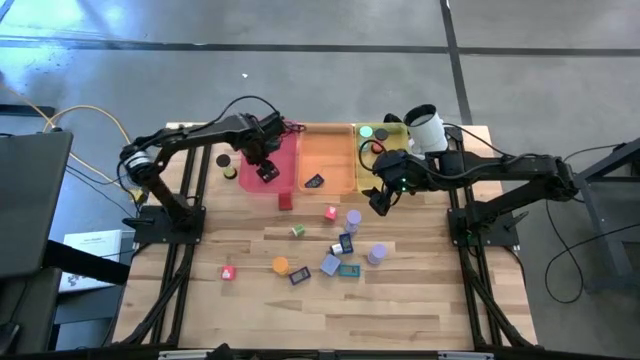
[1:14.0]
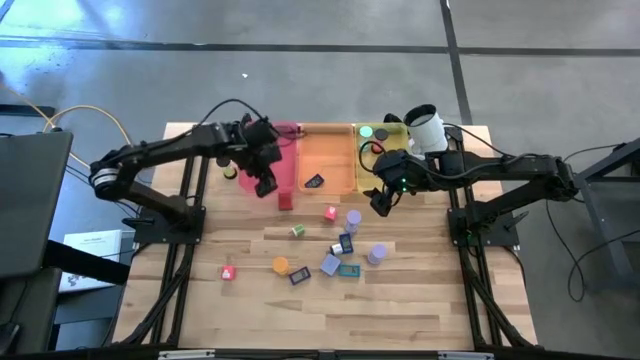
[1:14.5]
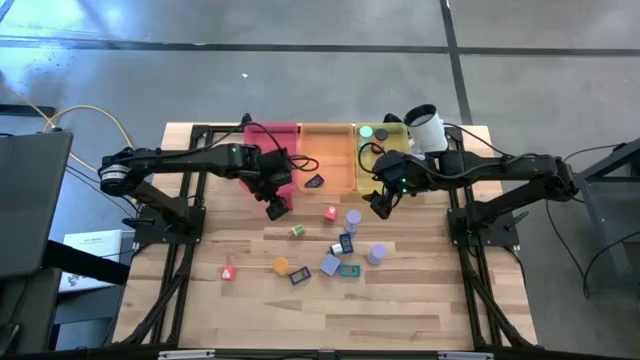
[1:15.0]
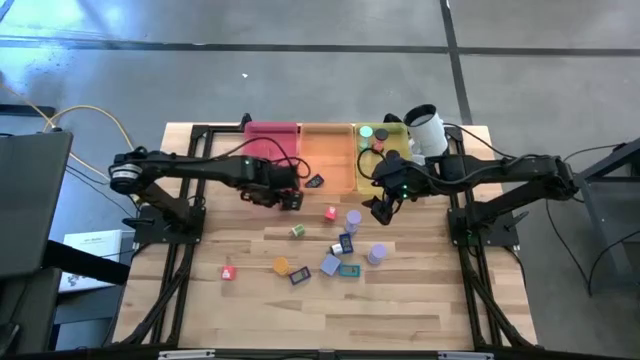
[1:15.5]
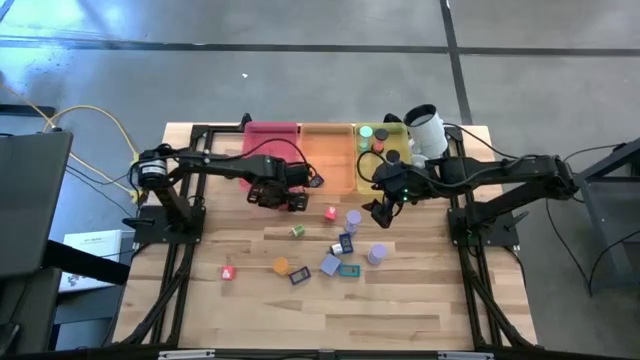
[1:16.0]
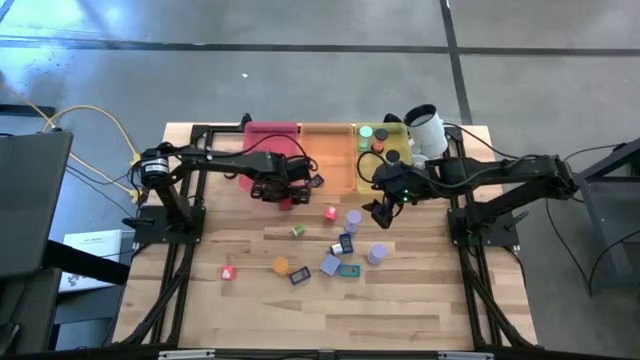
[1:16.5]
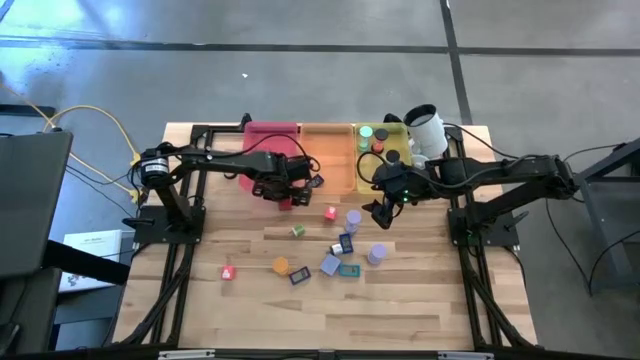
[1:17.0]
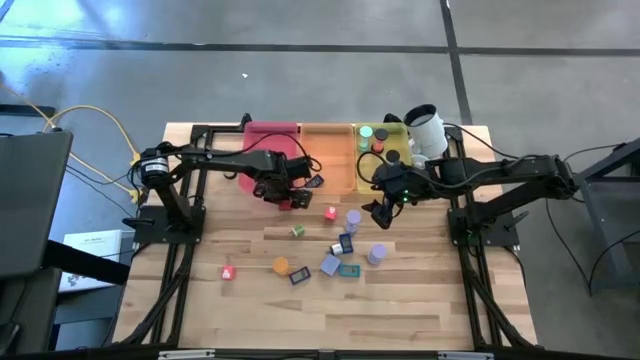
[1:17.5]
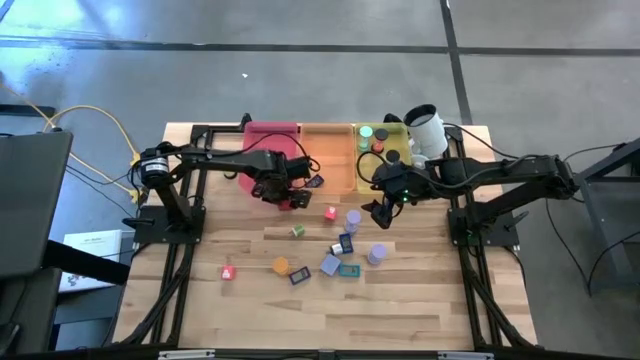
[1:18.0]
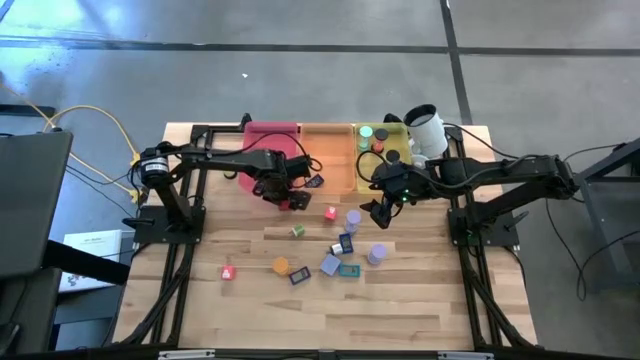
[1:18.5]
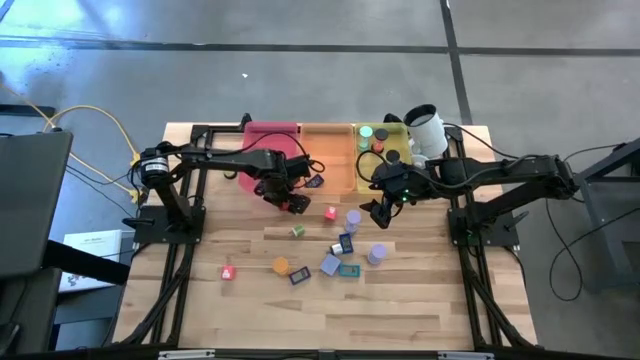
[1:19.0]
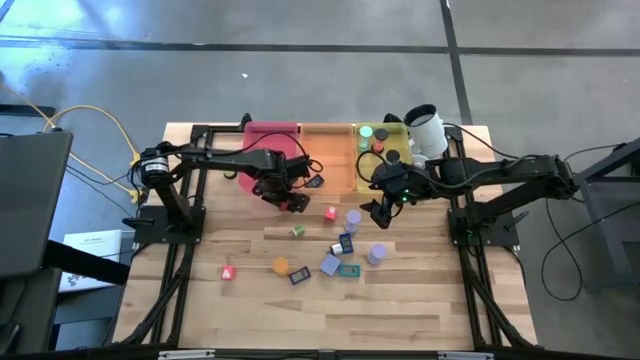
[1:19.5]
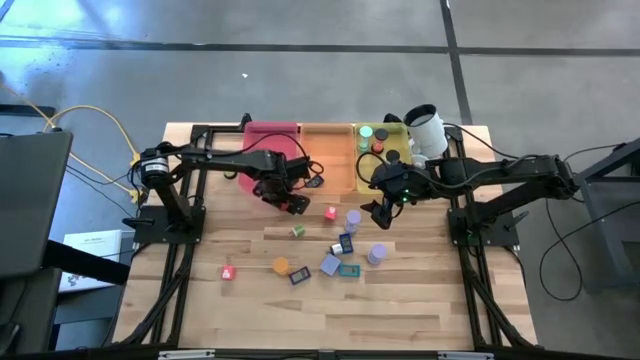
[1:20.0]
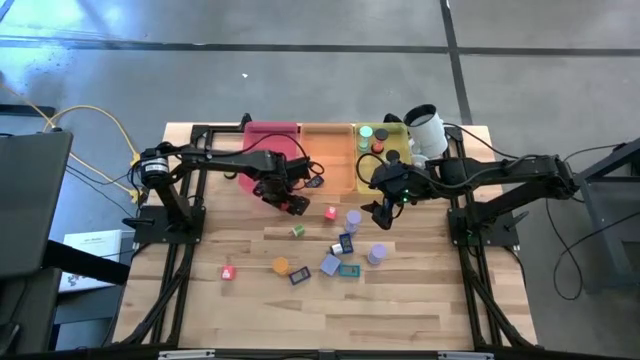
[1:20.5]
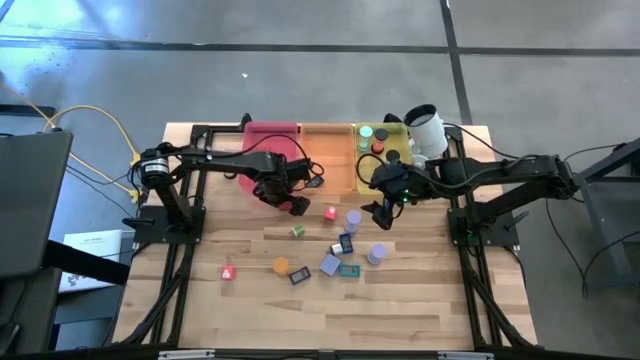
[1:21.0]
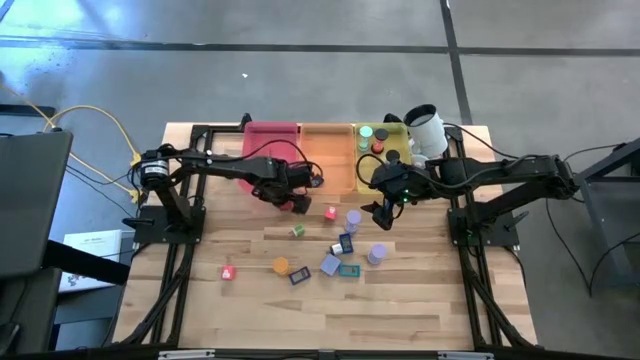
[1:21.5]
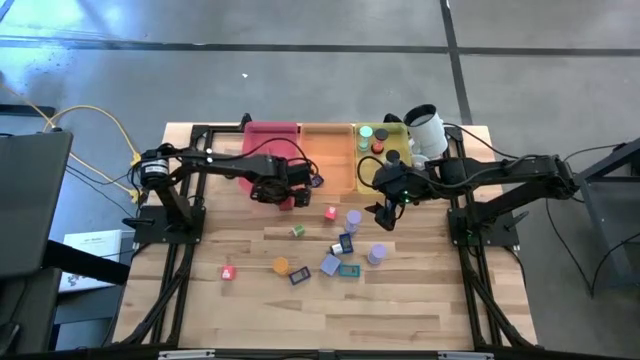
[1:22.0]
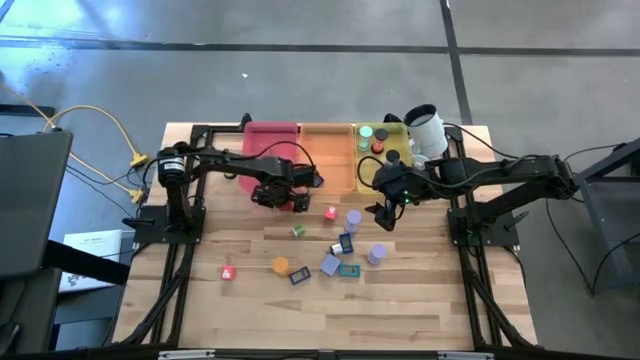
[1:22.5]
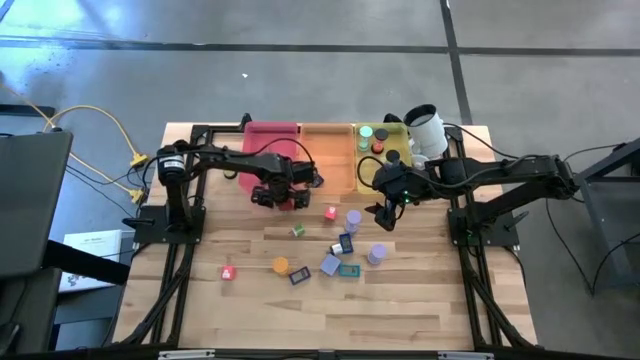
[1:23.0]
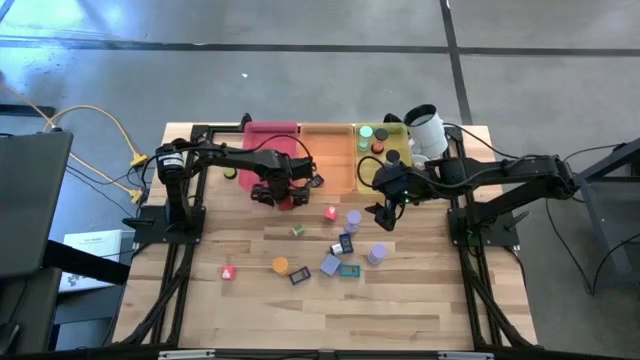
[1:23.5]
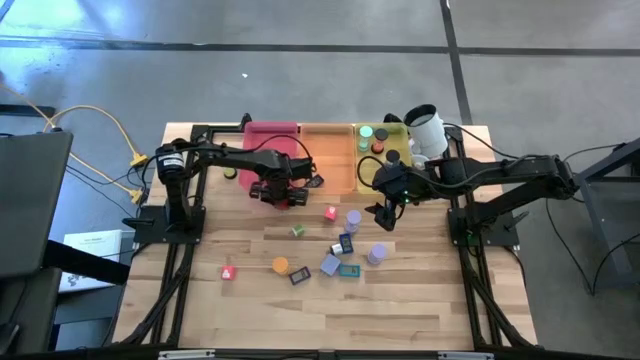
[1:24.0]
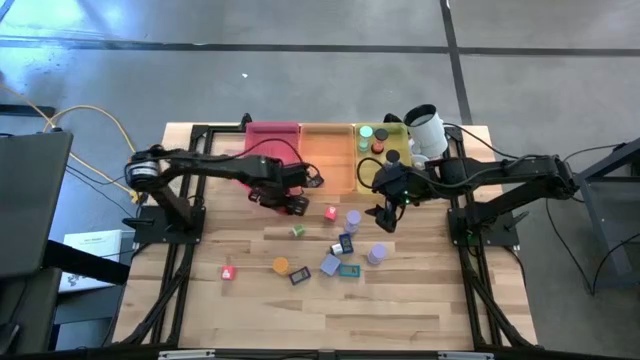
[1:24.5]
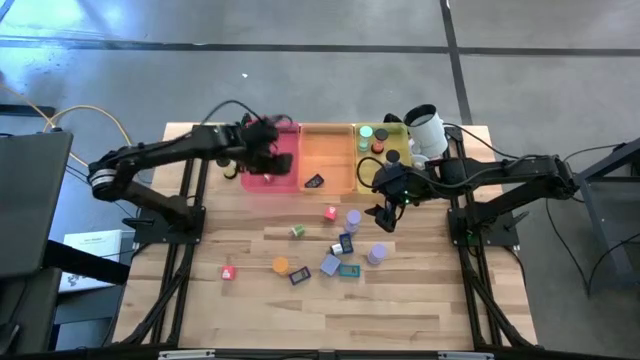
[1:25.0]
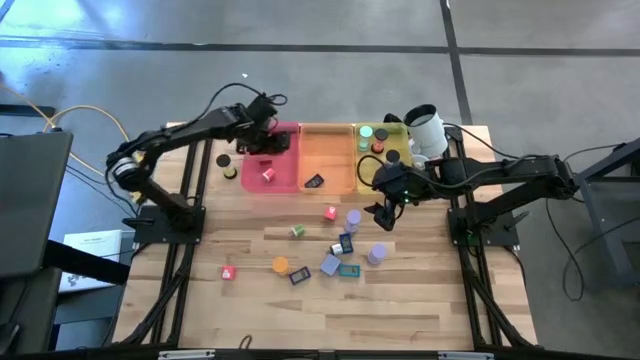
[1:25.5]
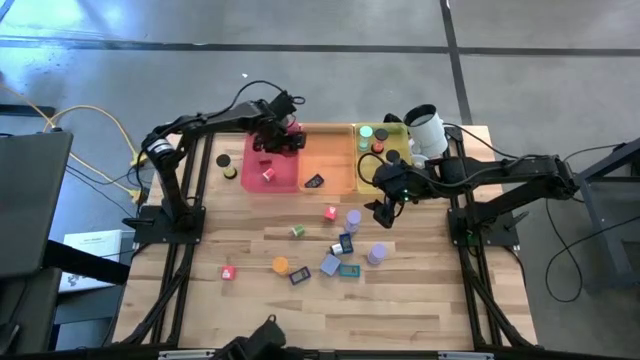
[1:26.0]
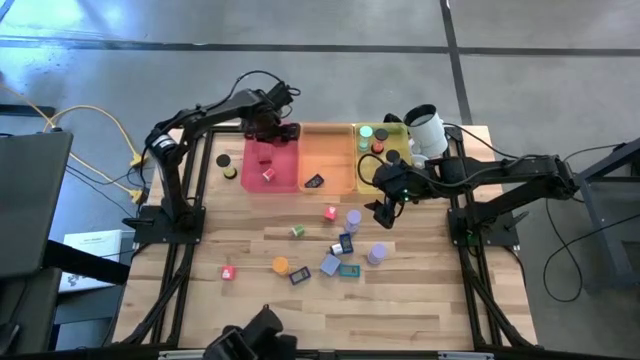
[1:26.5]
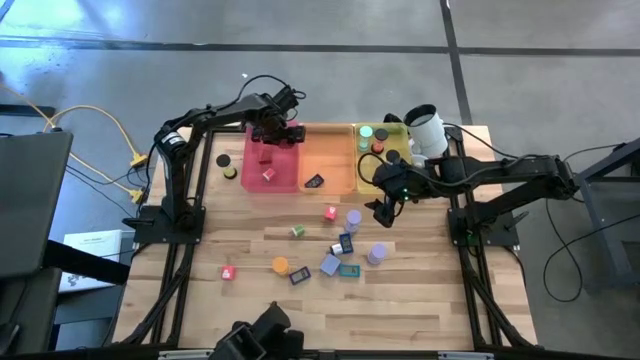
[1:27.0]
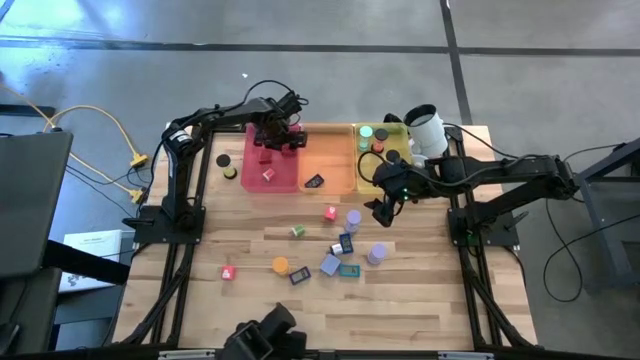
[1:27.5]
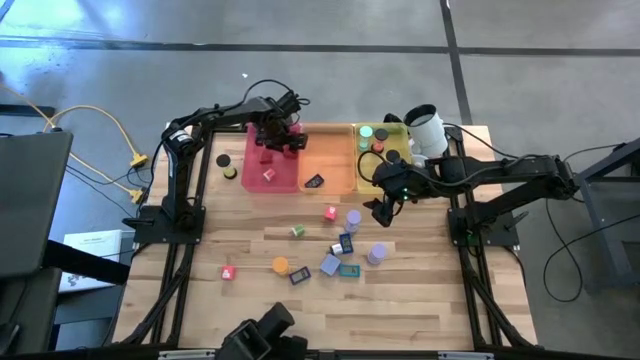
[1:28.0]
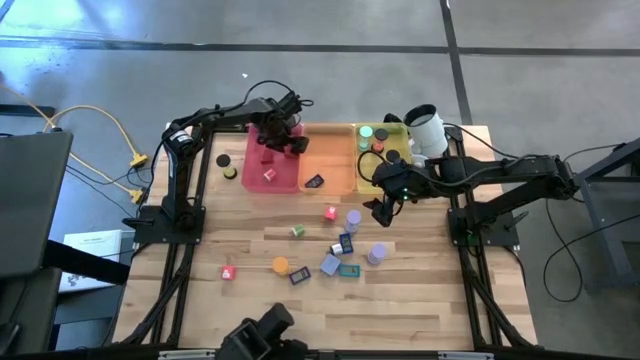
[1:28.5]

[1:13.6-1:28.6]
Task: Pick & Place Office items
Put the red charger adapter into the pink bin

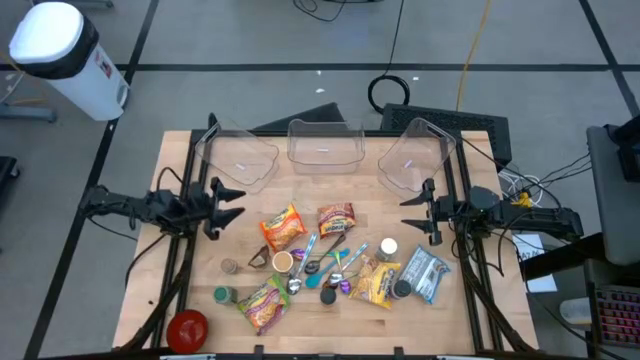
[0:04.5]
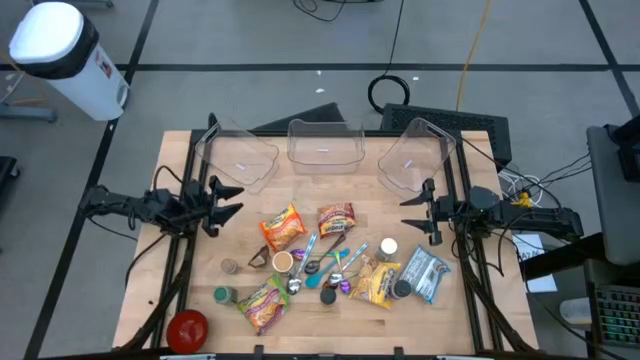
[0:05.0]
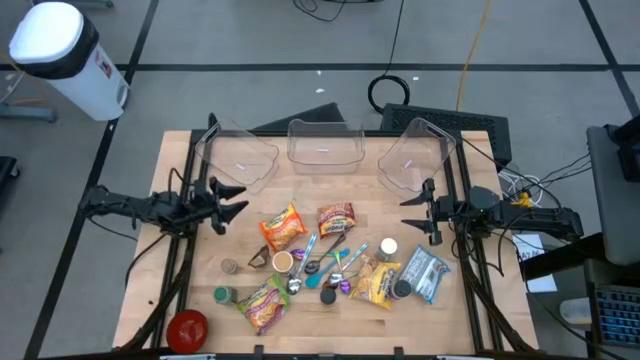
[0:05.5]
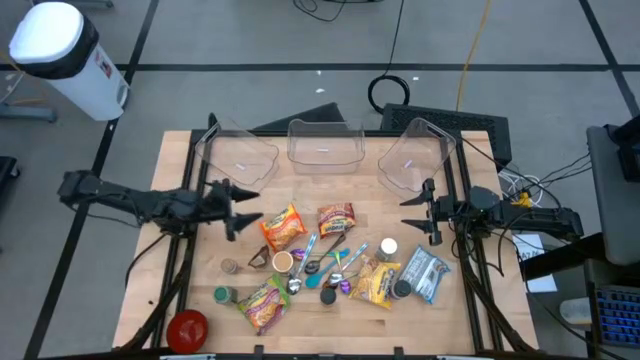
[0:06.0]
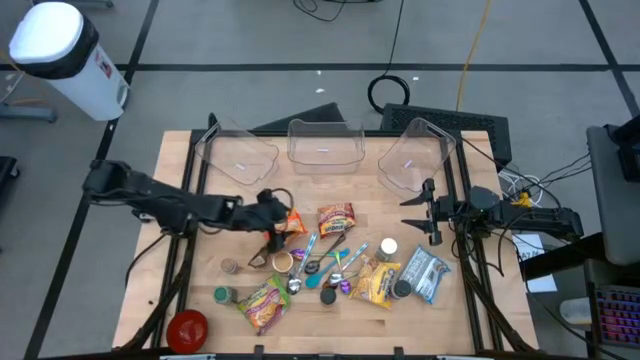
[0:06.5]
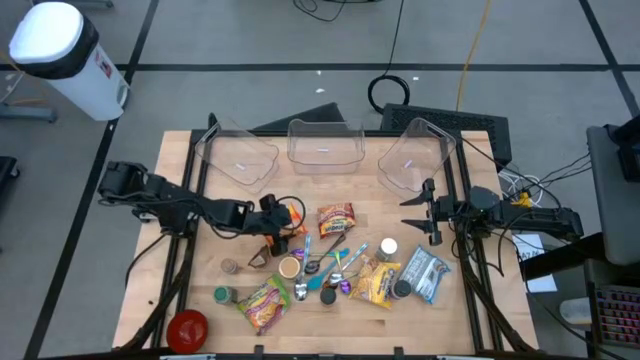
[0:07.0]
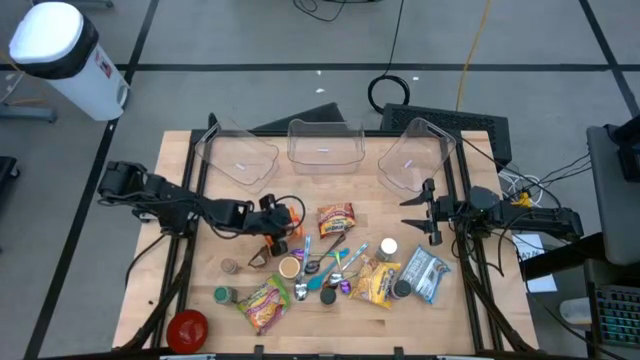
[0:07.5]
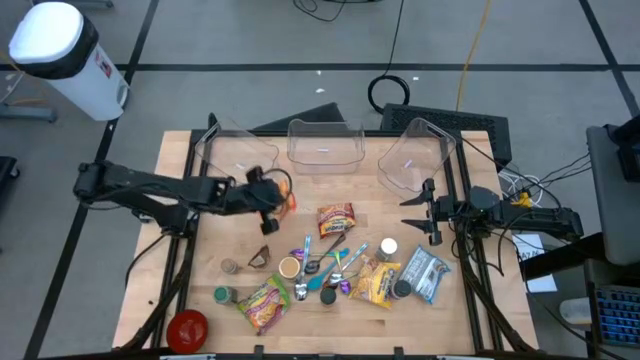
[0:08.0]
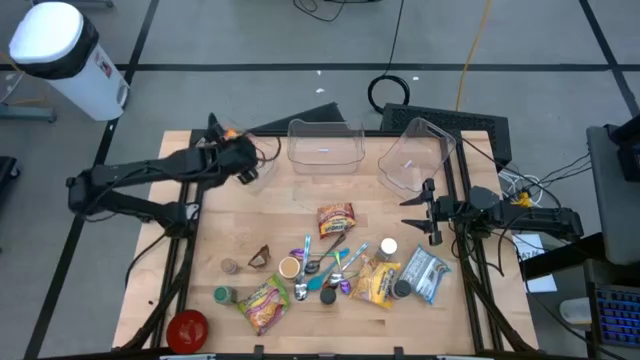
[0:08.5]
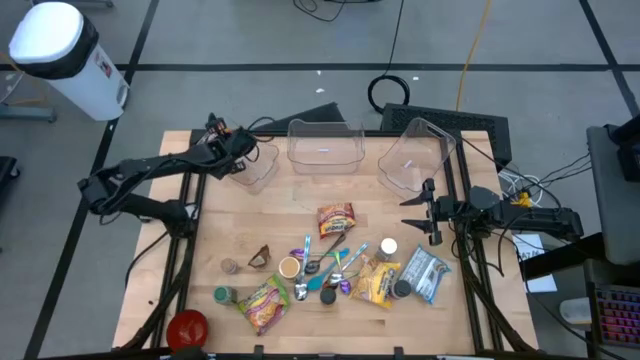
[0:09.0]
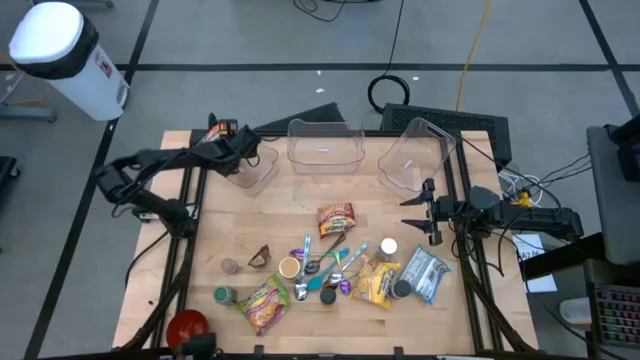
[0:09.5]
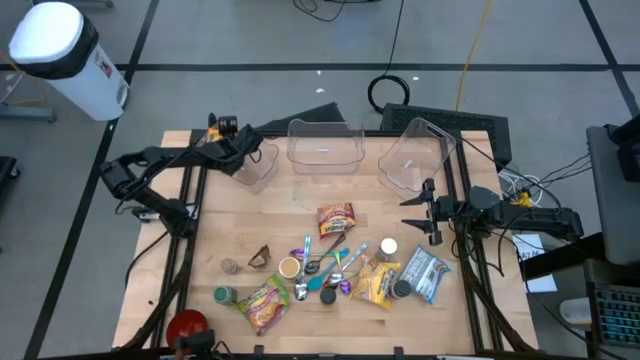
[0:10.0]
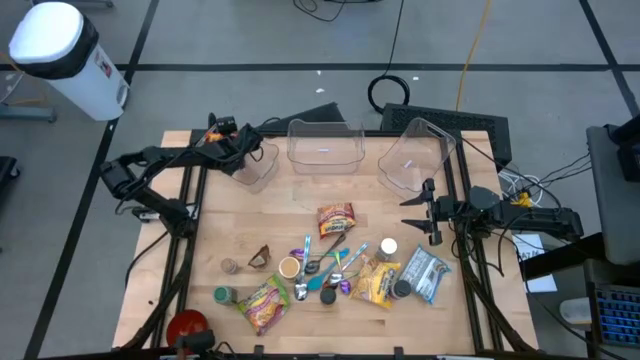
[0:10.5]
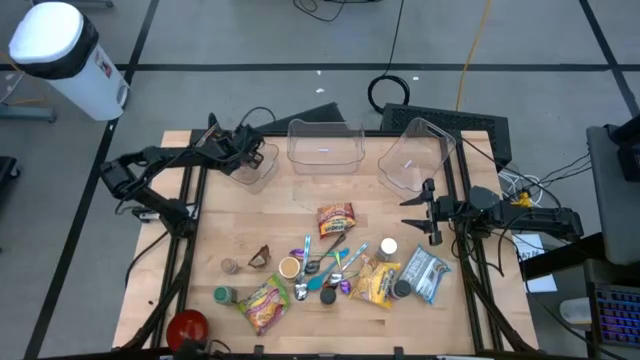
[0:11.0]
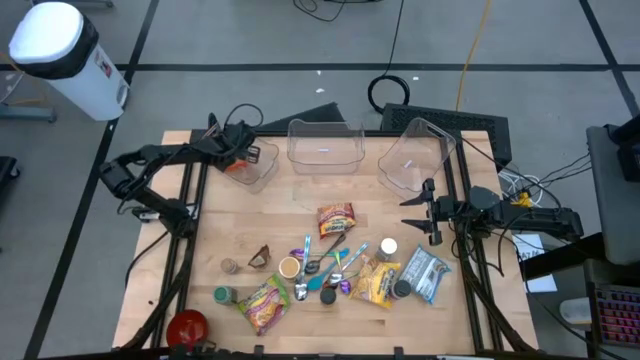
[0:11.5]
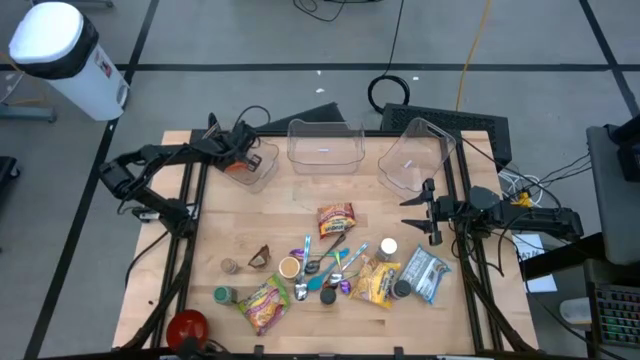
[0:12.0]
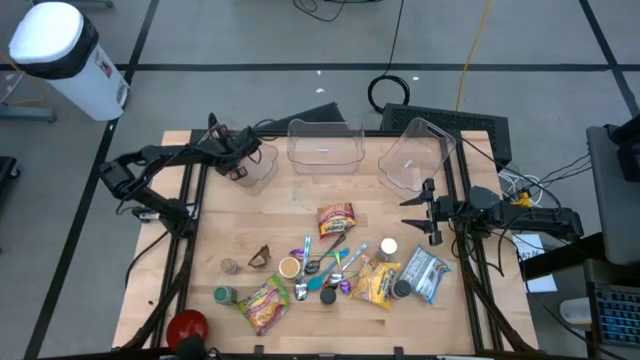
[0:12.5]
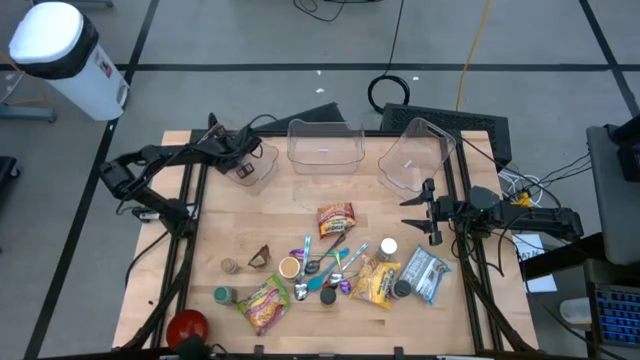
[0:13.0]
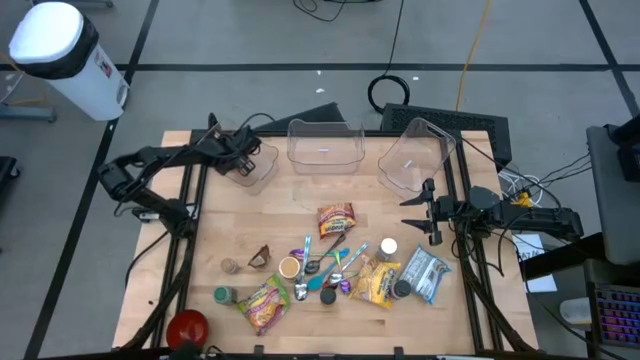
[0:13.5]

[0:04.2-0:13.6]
Task: Pick & Place Food Item
Put the orange noodle pack into the left transparent bin
